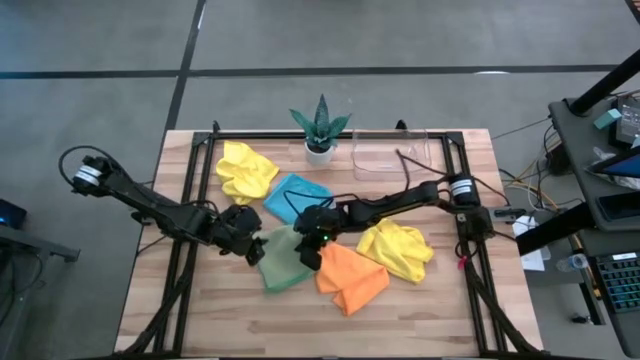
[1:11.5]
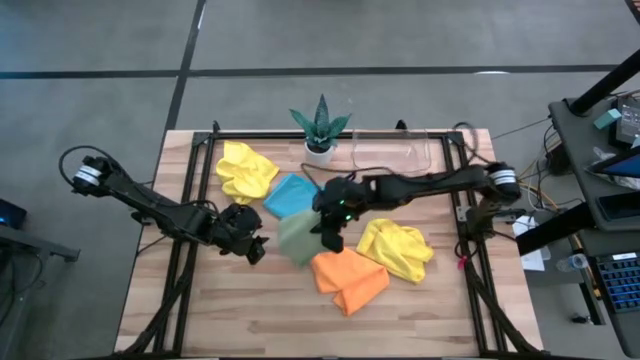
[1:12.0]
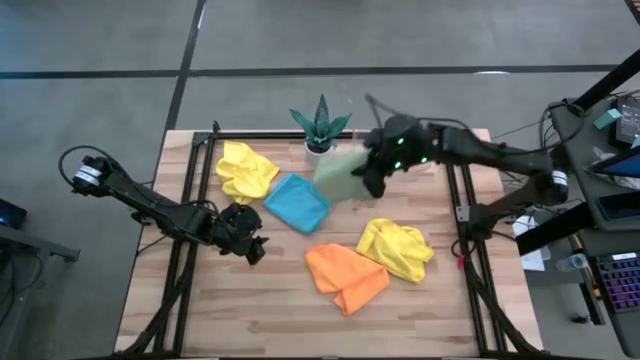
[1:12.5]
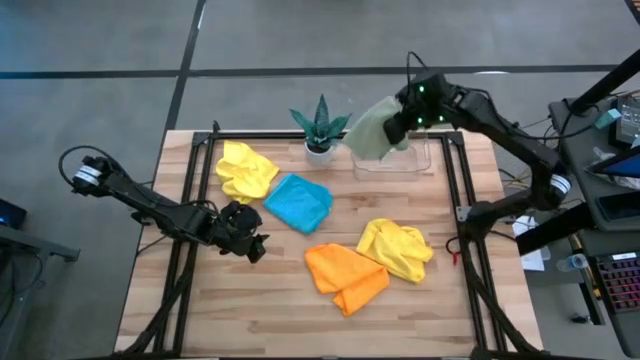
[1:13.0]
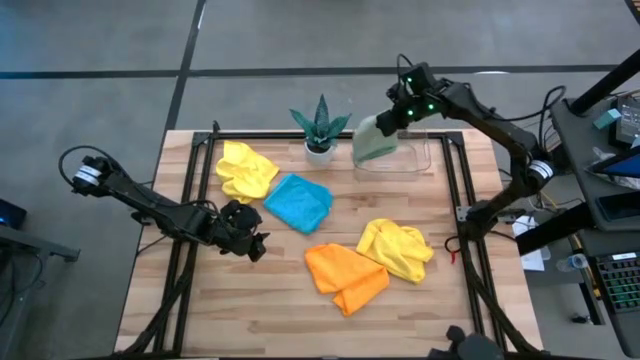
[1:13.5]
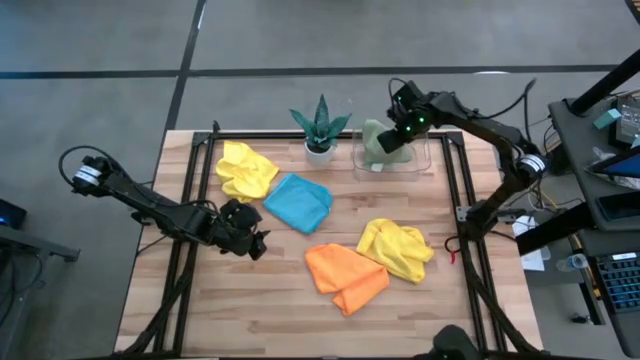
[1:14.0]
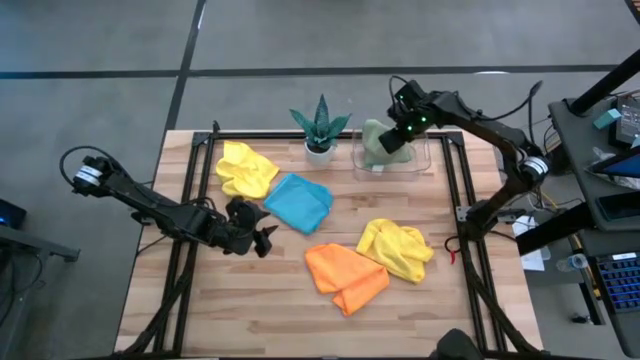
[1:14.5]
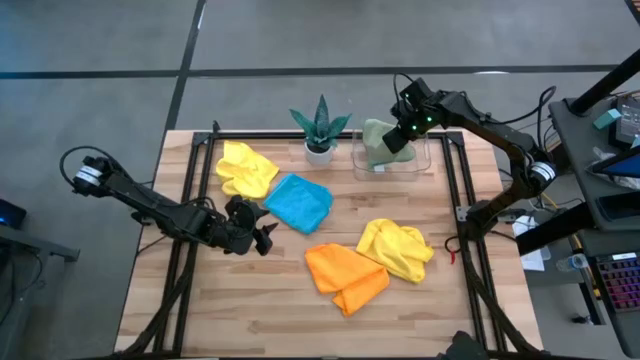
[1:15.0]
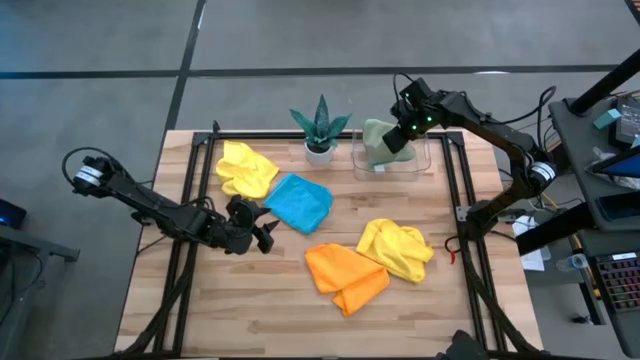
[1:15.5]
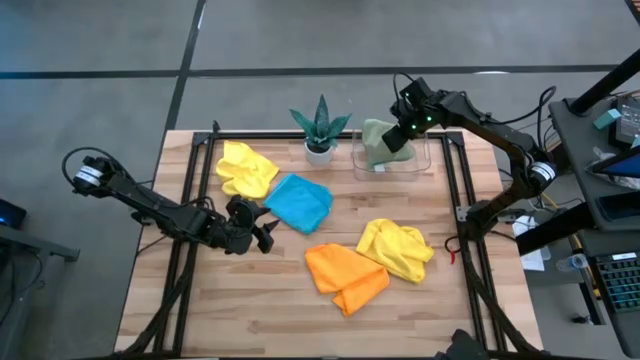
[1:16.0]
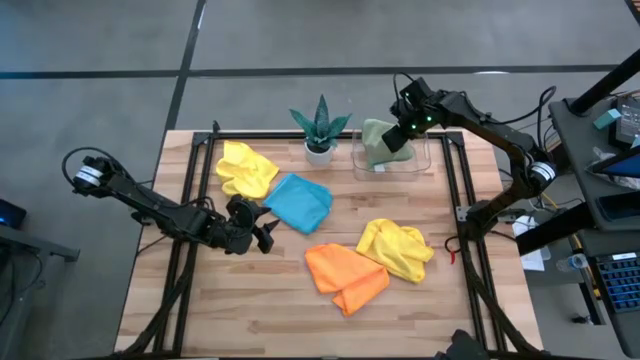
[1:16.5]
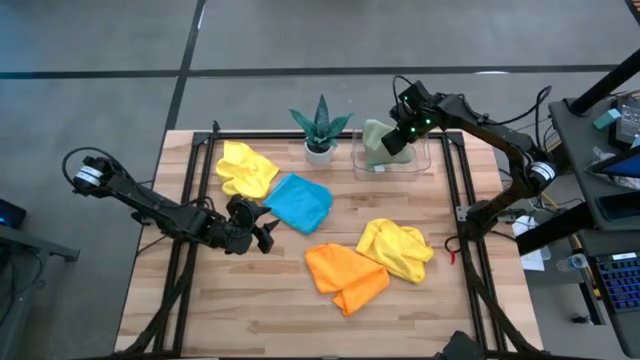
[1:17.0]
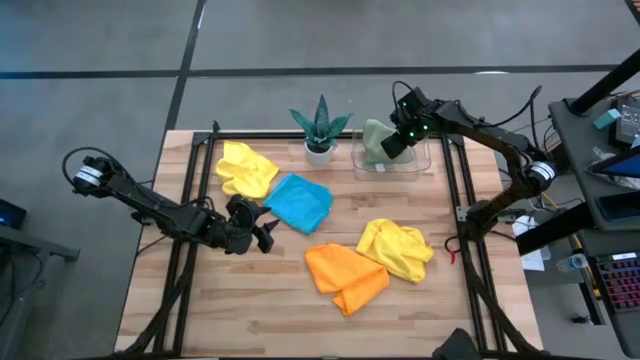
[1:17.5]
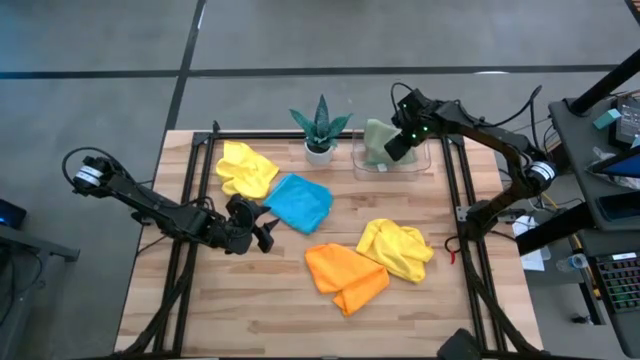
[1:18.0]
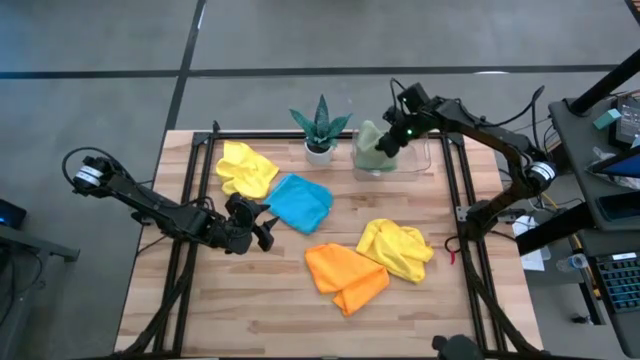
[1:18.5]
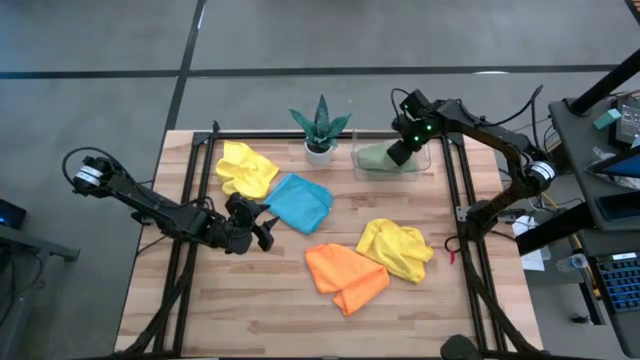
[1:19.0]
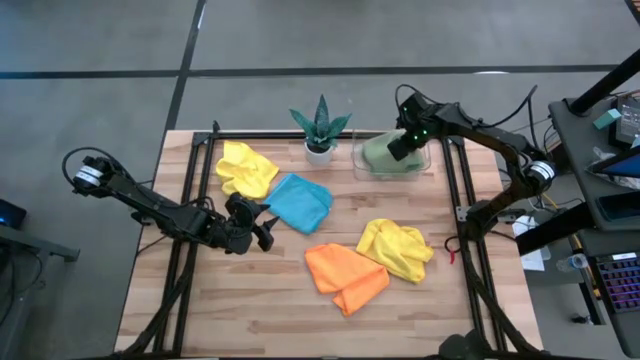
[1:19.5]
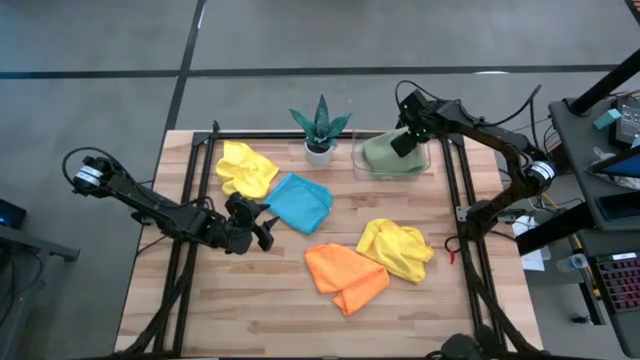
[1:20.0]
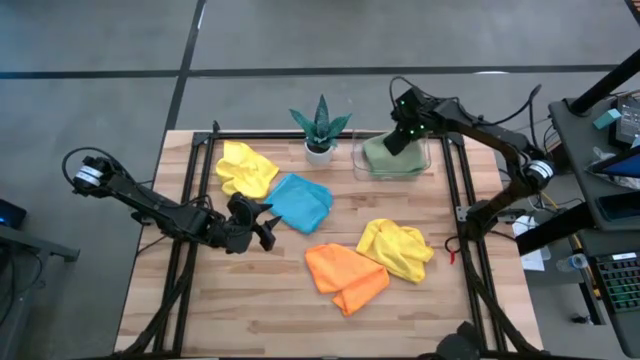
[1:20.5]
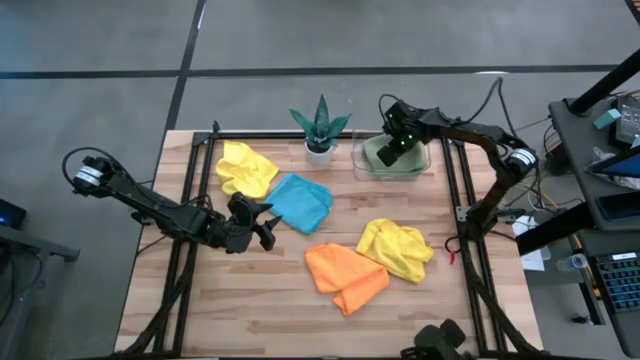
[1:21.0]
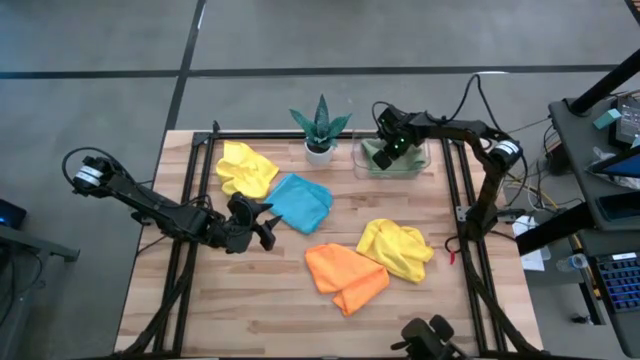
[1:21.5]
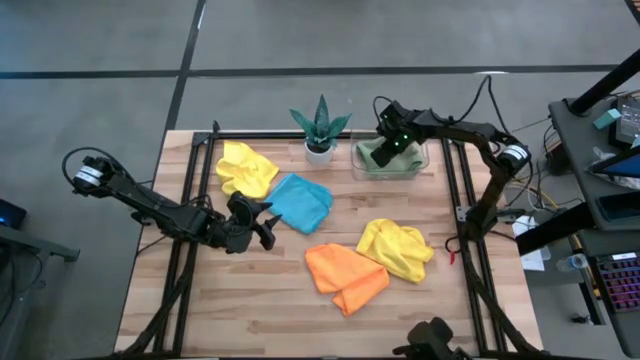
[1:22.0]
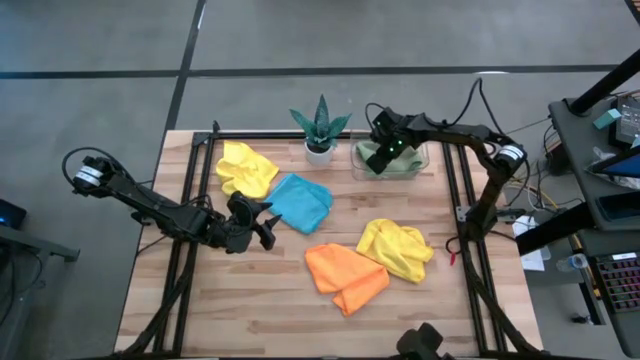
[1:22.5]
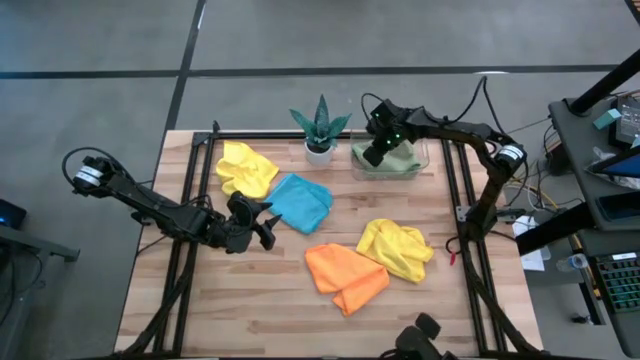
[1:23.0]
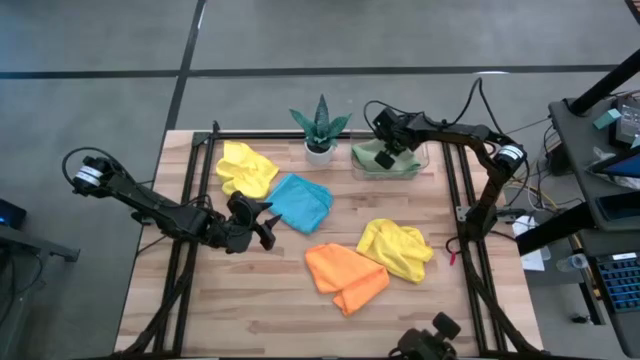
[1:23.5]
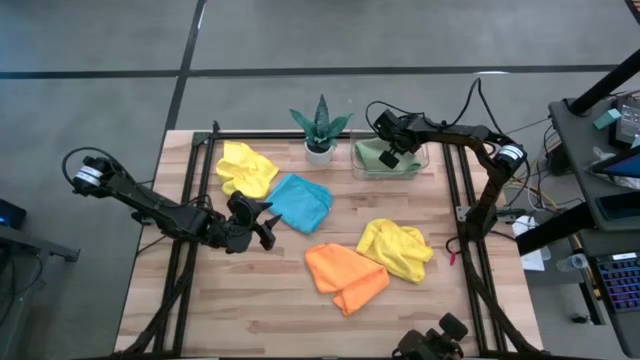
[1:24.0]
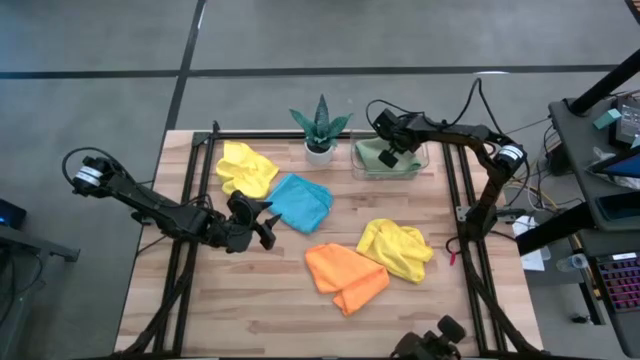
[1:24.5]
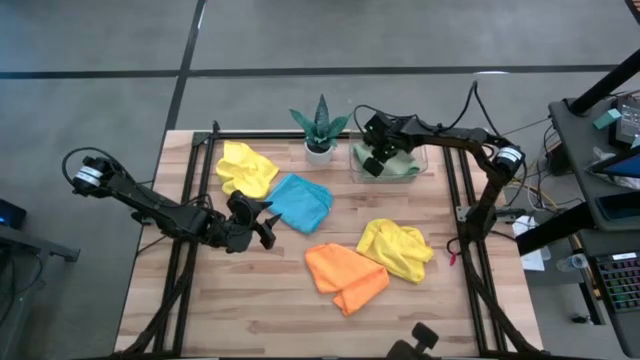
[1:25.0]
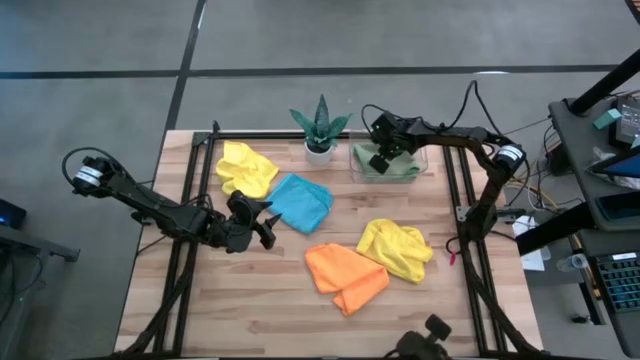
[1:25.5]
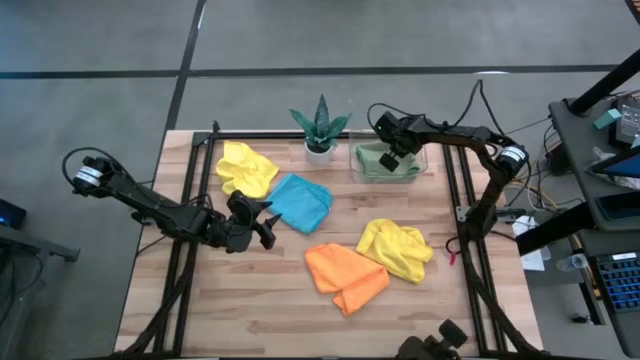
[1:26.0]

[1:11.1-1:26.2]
Task: Fold microfiber towels
Put the green microfiber towel into the transparent bin

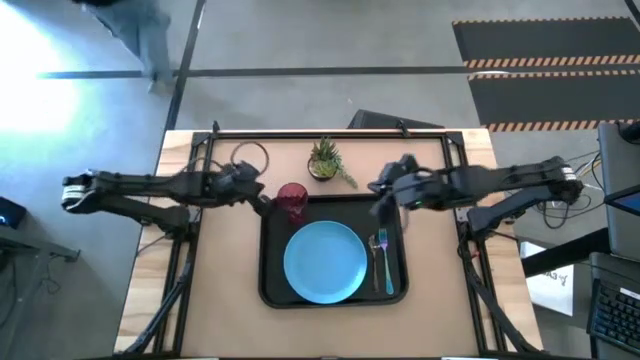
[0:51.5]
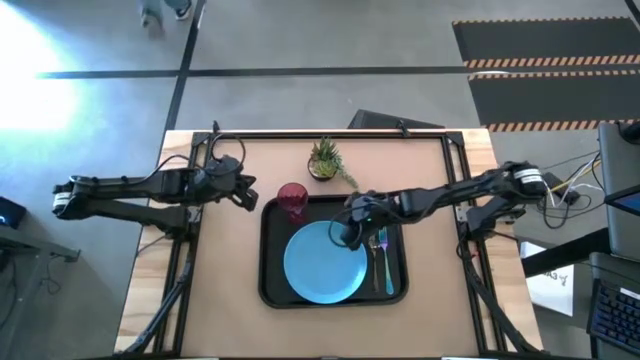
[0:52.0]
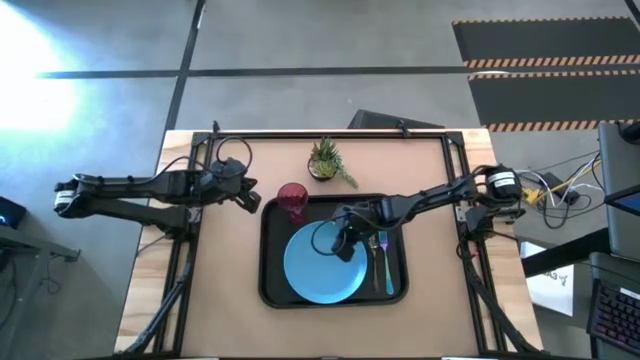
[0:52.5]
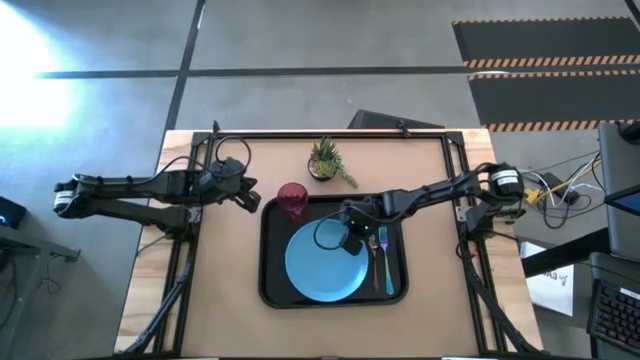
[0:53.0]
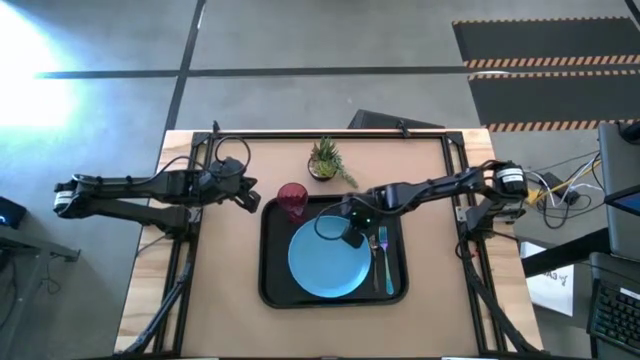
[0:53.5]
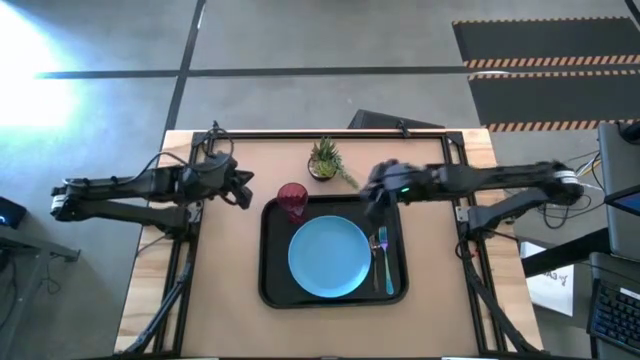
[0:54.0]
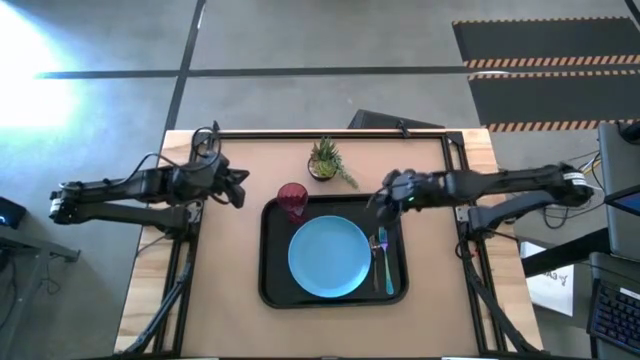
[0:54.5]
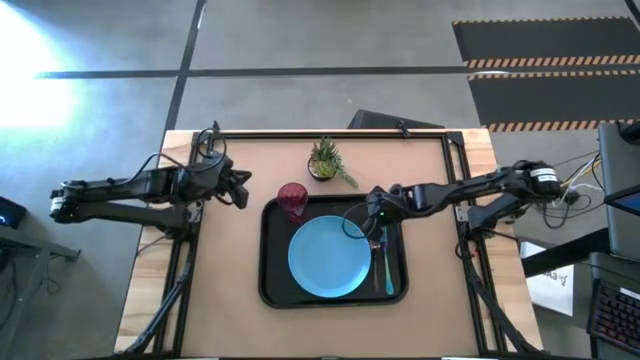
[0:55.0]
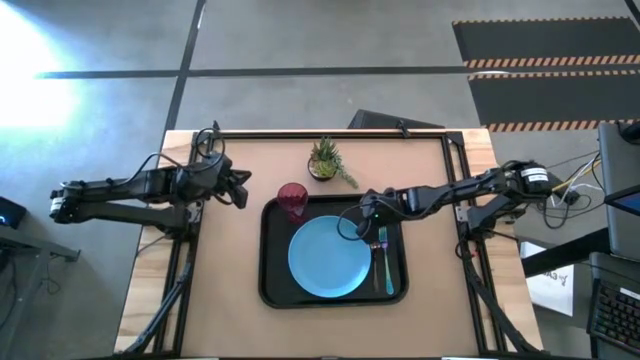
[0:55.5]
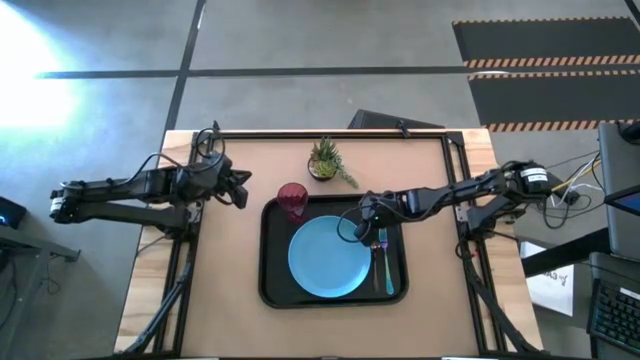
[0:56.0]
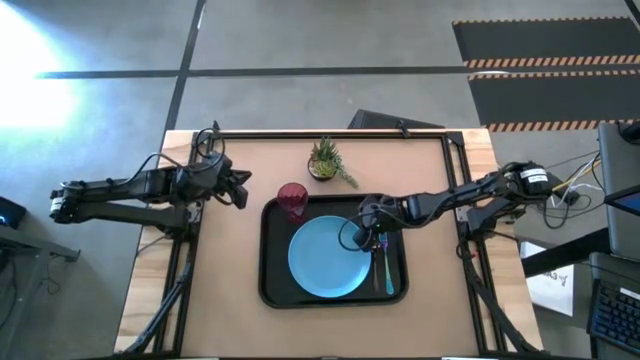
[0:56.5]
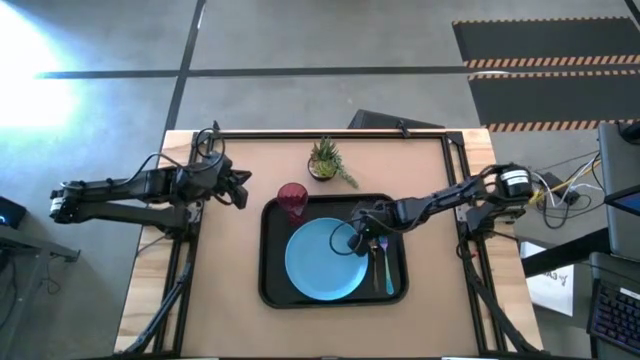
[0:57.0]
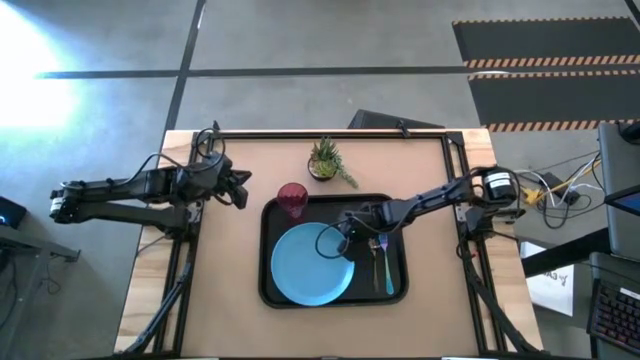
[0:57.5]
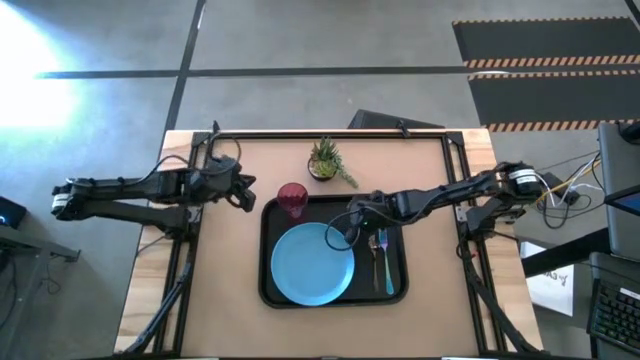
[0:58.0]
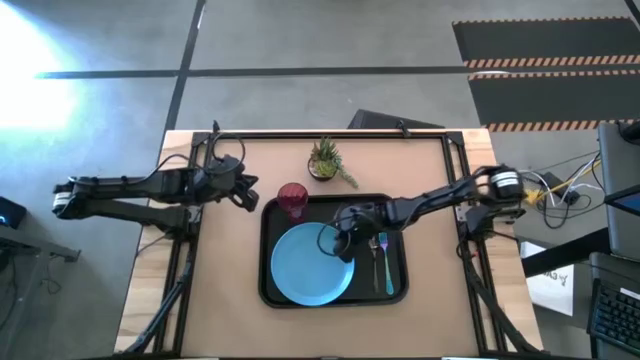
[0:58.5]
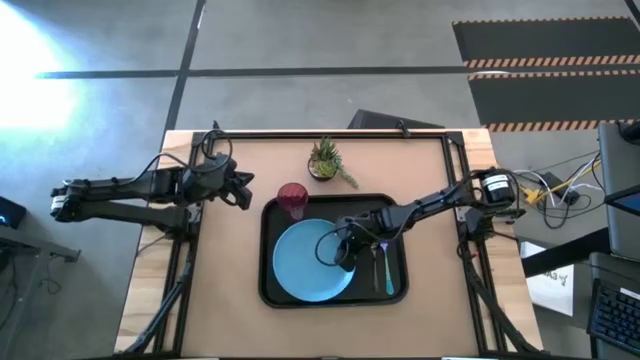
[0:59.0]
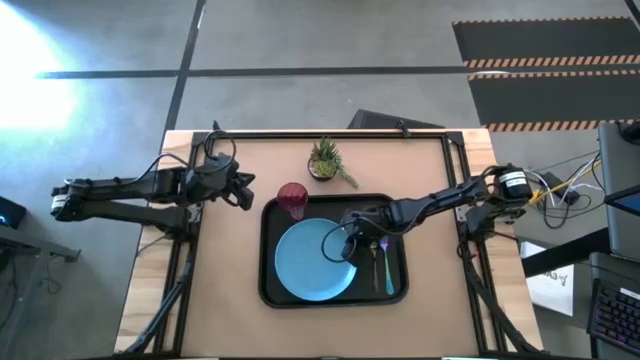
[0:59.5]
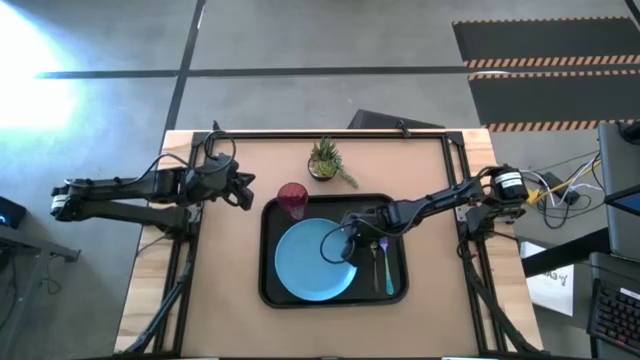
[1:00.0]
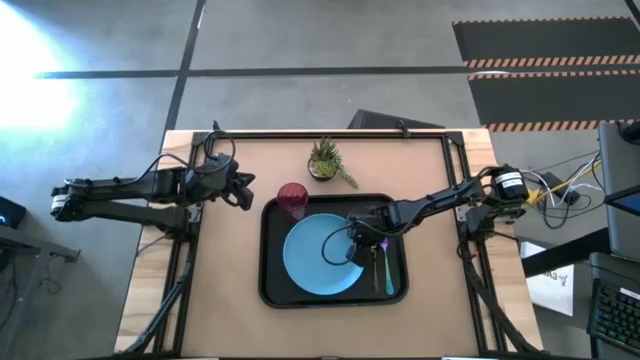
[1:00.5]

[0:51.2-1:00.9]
Task: Pick and place plate/cup/fork/spoon on tray
Adjust the blue plate on the black serving tray
